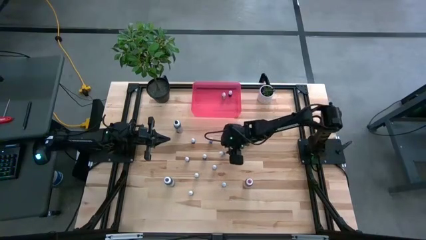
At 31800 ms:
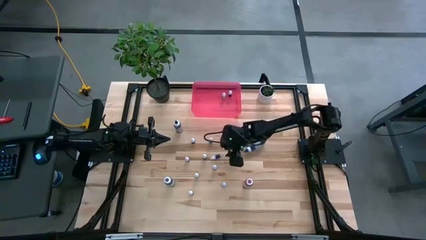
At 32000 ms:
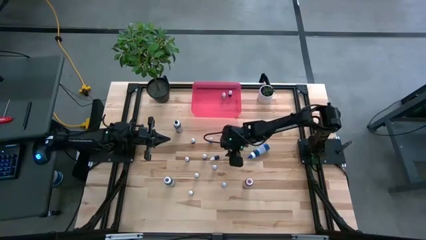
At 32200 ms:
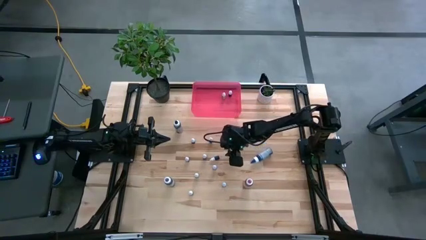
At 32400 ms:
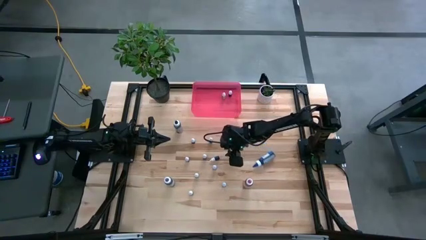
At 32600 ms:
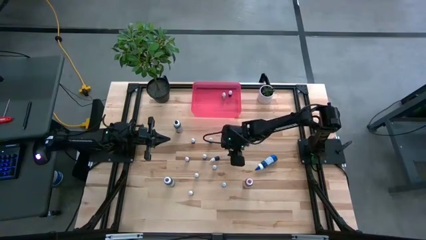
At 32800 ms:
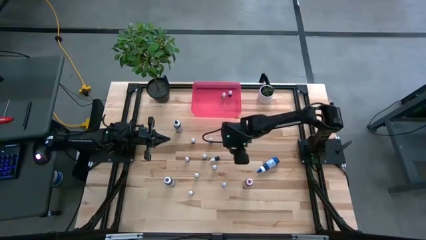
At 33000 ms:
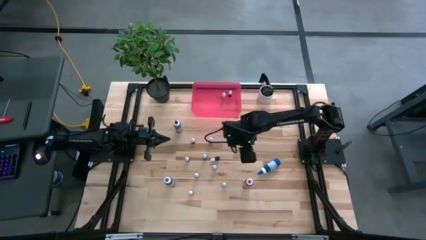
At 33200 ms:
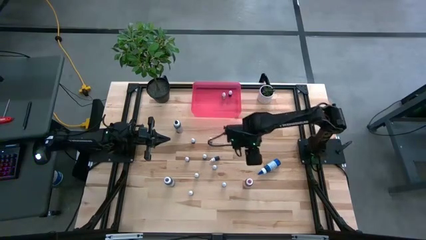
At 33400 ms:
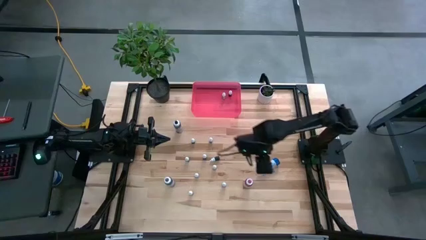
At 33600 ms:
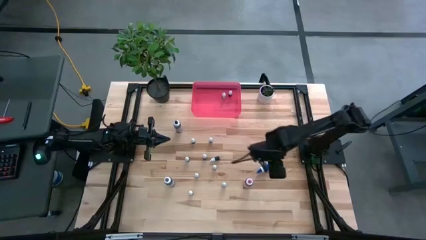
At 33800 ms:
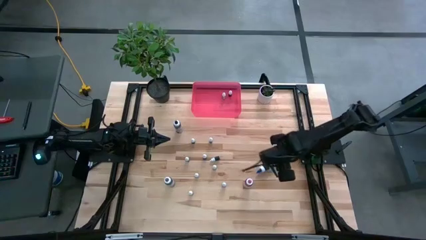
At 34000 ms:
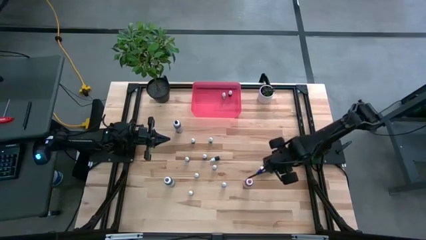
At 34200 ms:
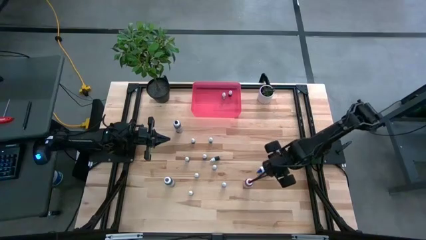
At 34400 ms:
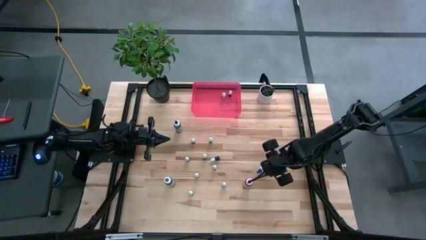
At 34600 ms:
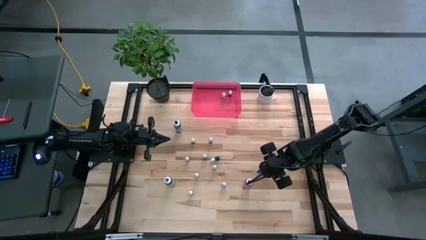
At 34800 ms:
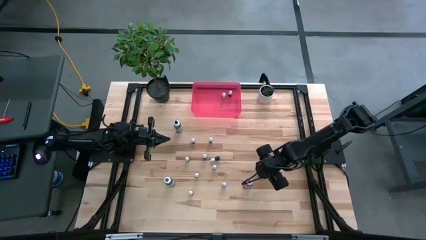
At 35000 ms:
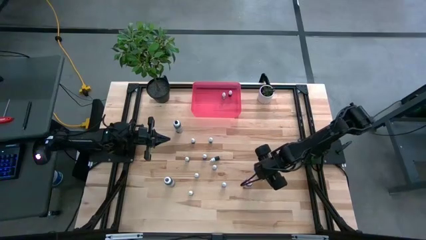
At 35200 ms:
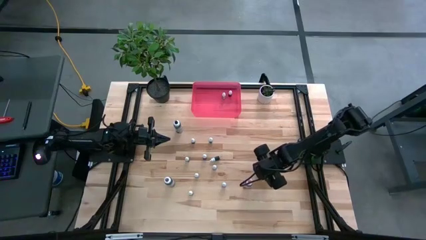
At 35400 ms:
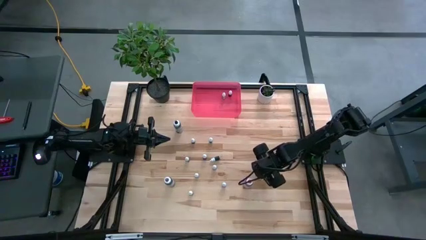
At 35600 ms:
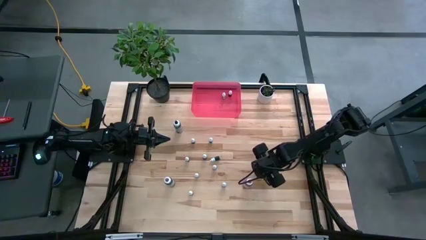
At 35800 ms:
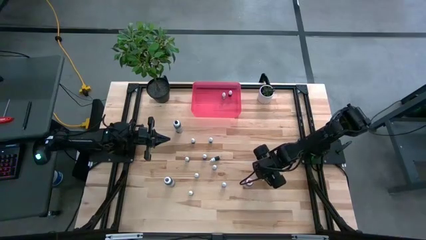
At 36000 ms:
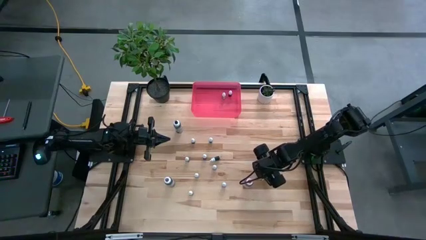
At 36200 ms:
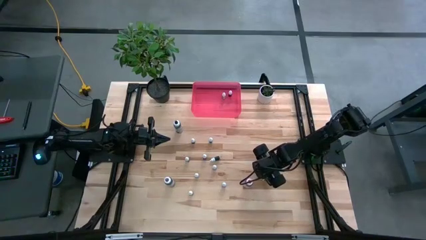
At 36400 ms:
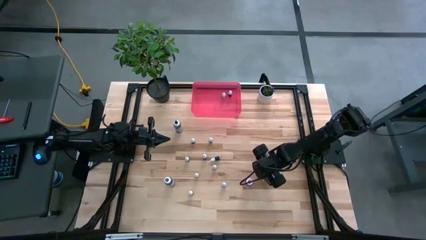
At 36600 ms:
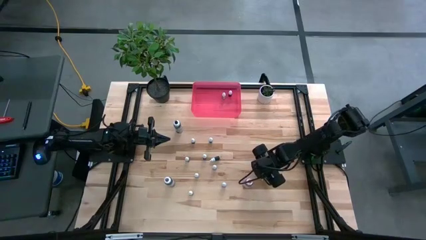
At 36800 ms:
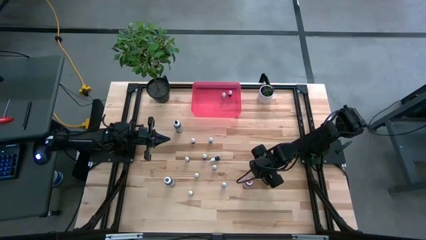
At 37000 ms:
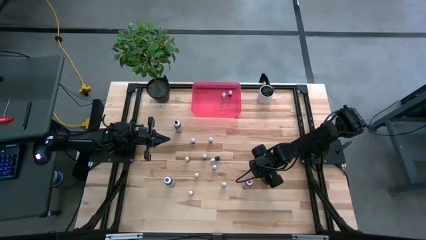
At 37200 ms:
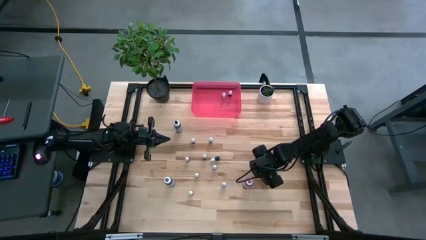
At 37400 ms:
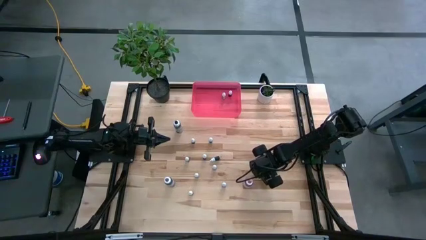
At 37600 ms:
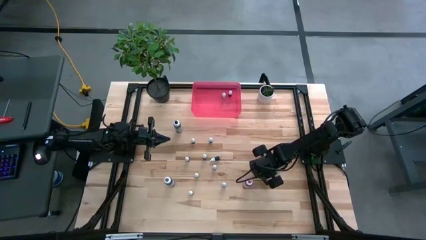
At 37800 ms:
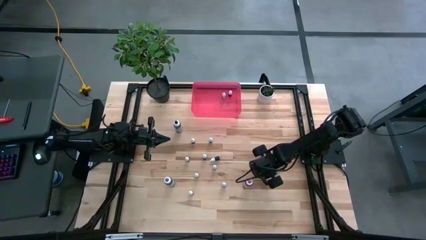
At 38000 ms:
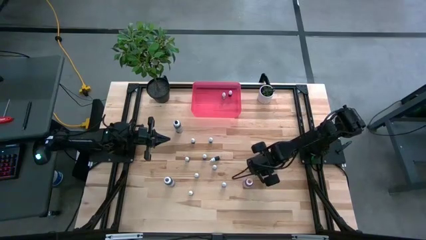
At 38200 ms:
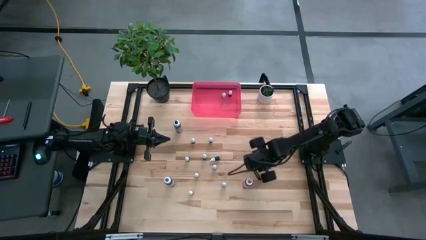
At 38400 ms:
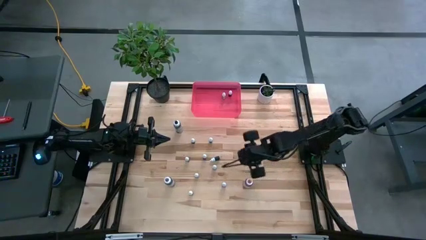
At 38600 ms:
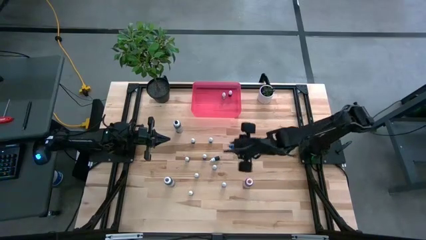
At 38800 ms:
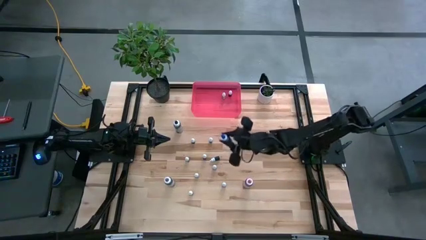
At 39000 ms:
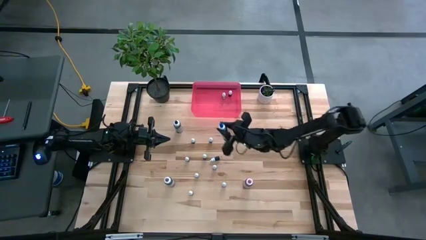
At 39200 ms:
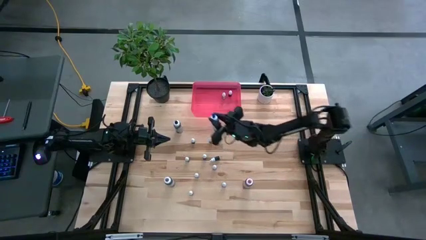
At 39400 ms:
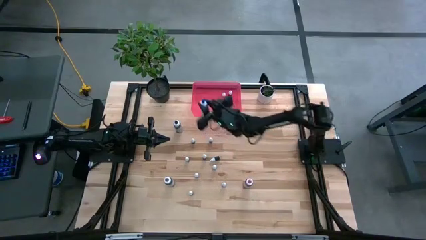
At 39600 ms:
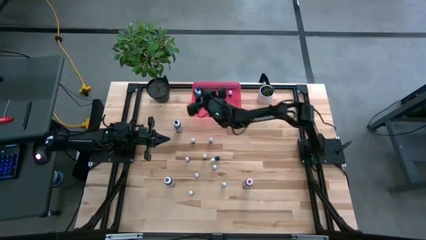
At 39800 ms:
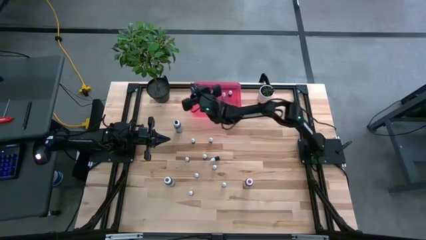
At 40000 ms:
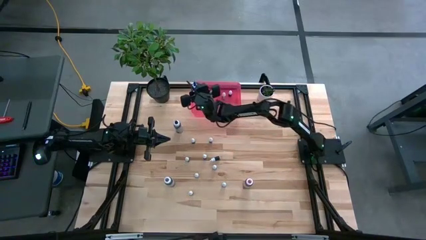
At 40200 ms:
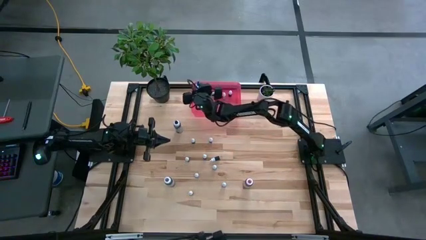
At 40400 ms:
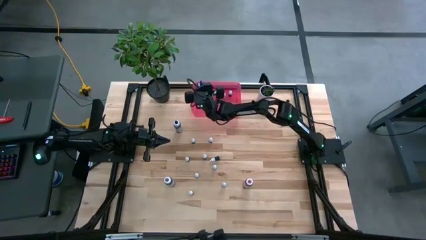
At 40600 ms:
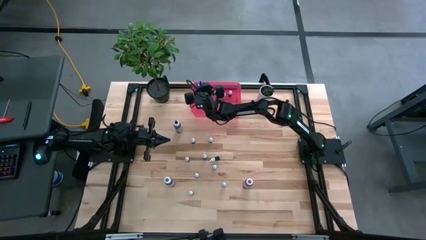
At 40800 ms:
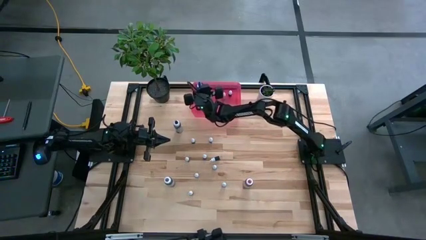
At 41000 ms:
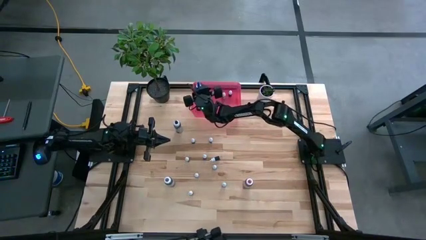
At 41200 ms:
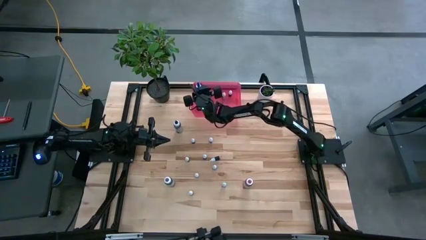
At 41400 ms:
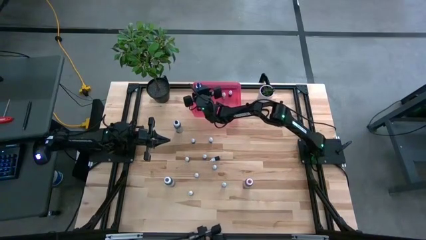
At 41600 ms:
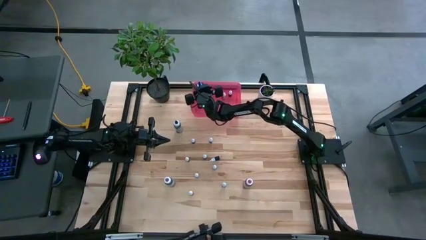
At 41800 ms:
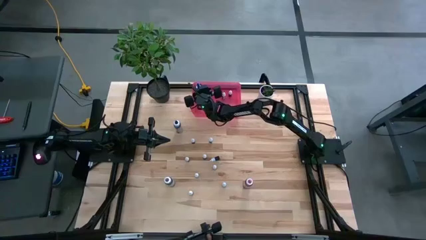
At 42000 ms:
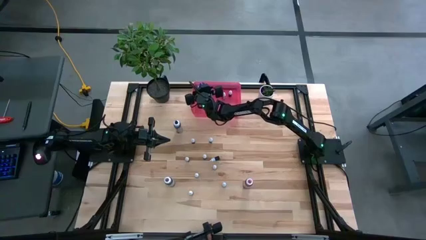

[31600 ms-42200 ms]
Task: Pick & Place food coloring
Put the large blue food coloring bottle into the red bin

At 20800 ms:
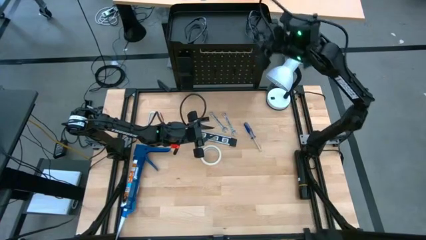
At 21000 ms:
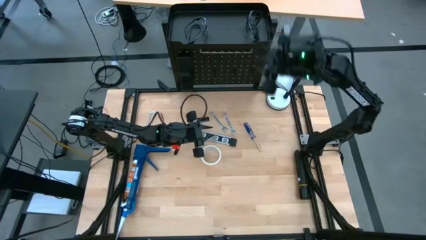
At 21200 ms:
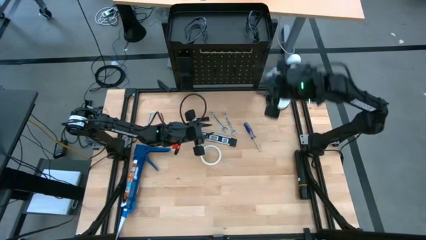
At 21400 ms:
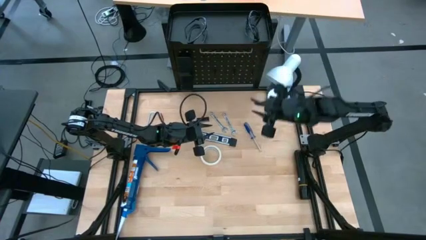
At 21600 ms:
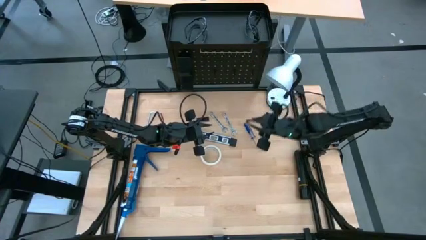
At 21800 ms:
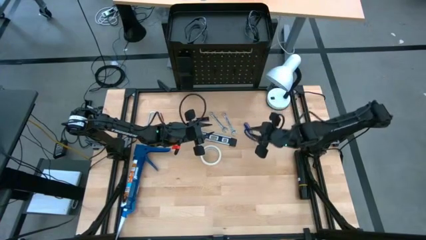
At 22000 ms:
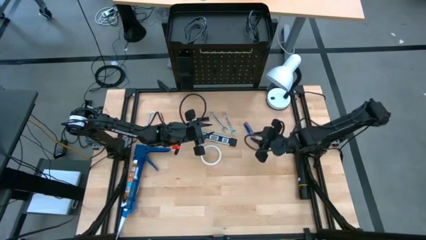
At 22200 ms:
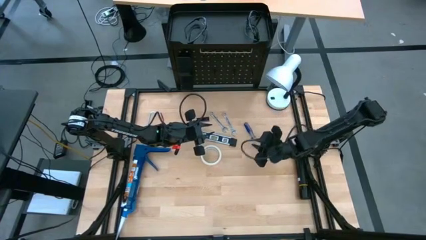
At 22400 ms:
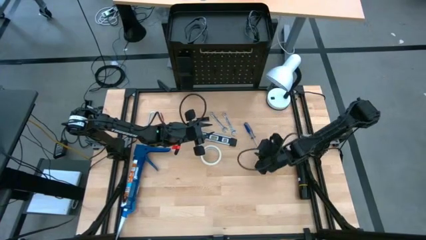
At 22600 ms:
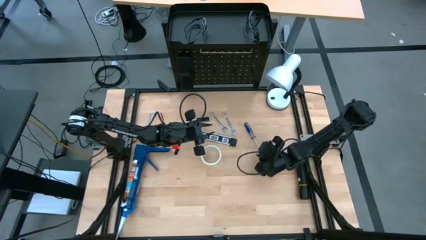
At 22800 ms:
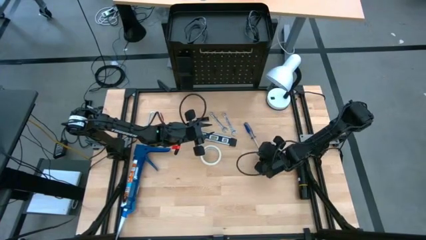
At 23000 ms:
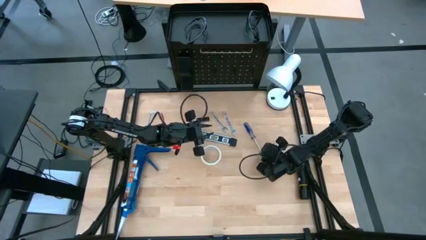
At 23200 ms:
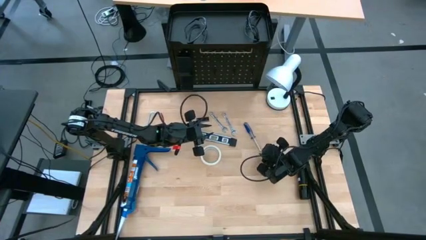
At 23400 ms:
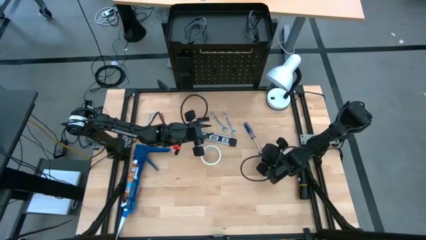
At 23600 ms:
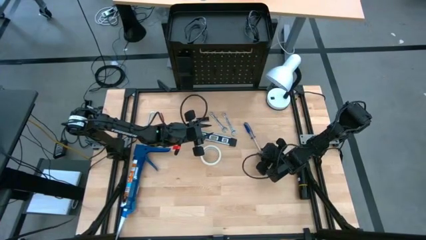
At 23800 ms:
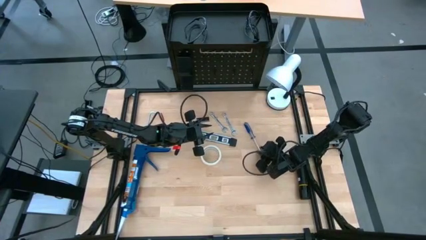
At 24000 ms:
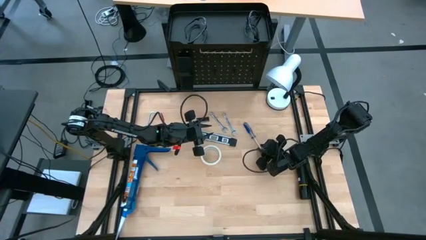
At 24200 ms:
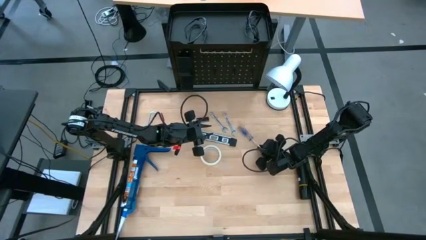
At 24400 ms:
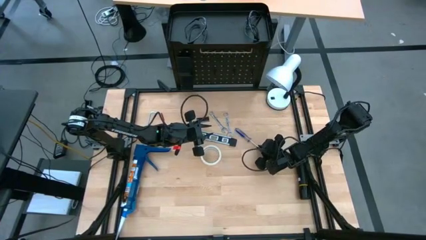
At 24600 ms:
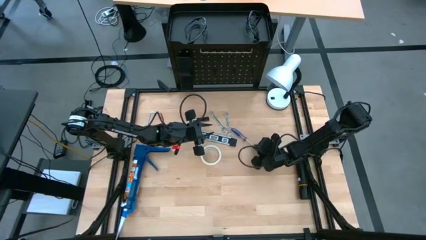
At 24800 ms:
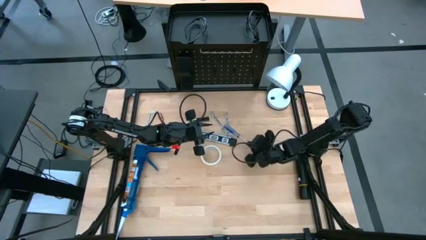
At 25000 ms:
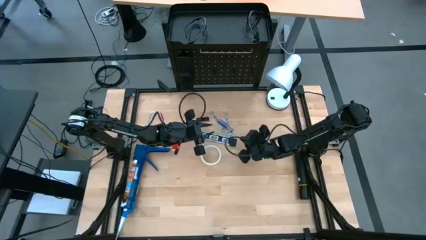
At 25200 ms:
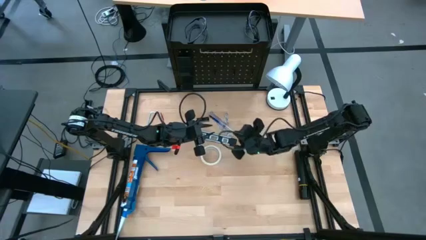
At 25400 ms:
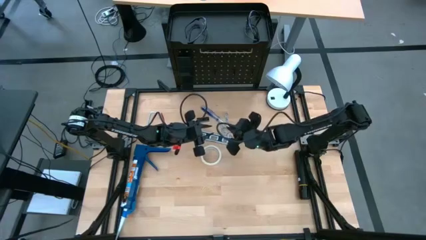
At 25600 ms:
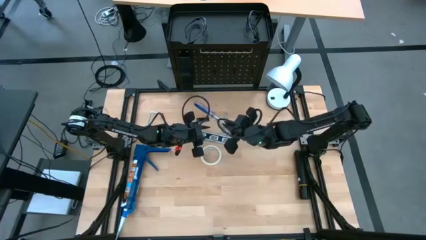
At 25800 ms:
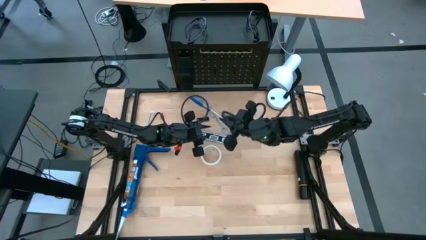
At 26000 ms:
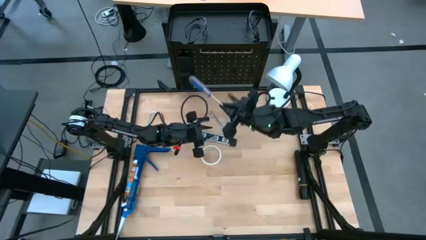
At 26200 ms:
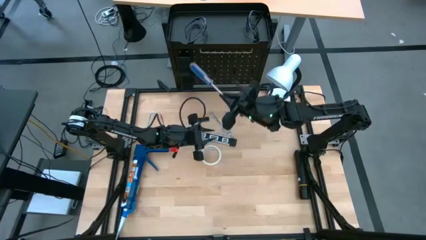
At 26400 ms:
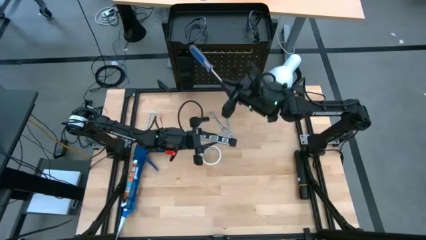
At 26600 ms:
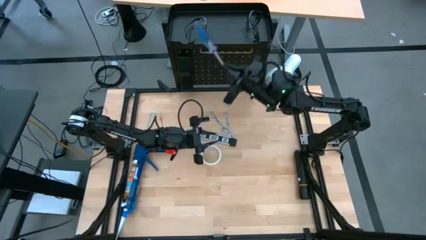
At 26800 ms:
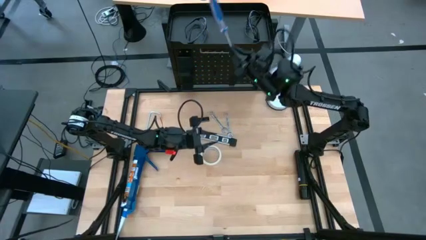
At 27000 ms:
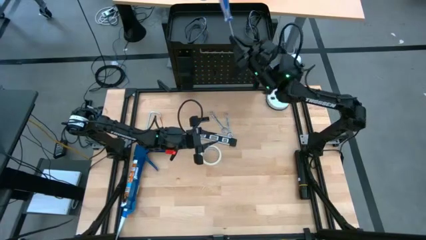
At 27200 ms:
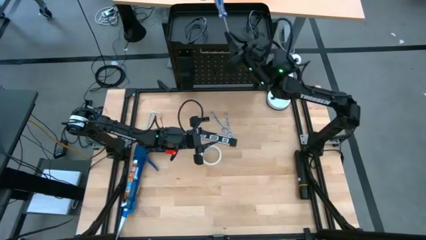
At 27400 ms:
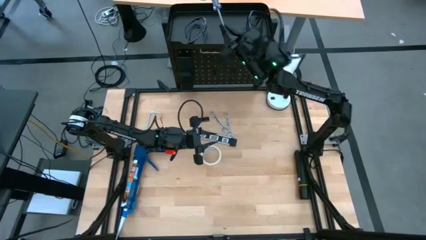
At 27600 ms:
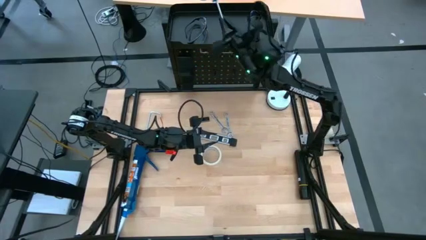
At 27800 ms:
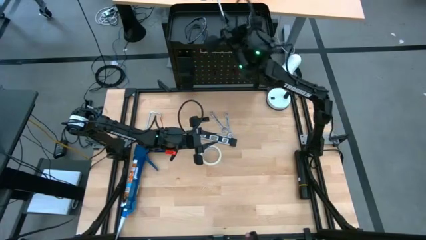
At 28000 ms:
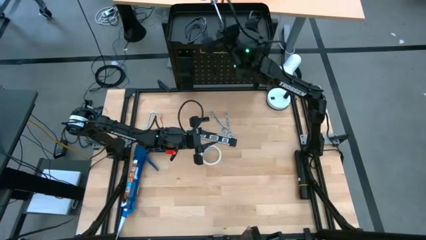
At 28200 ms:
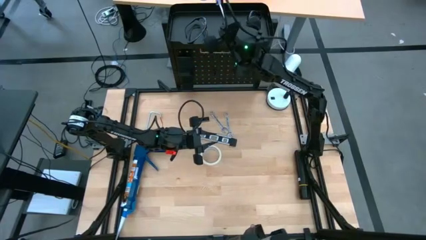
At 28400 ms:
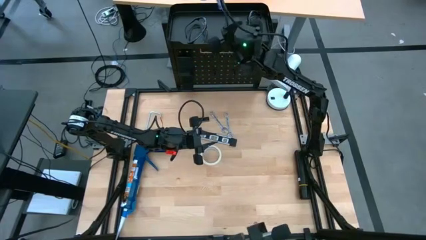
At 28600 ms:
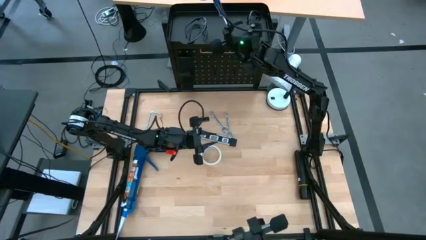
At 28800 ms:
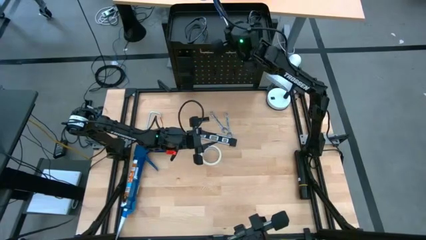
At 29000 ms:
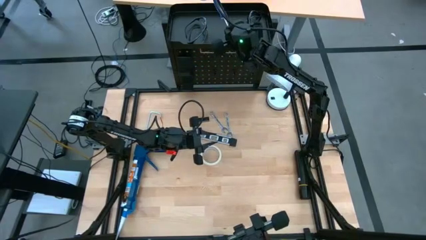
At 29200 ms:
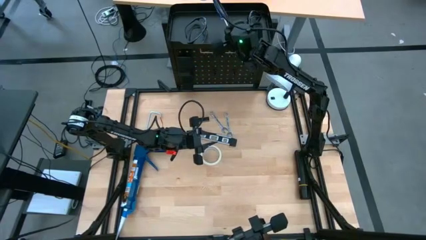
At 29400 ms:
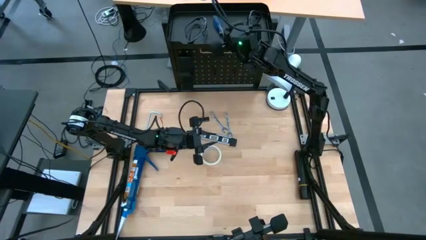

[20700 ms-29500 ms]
Task: Hang tools onto peg board
Put the blue screwdriver on top of the pegboard
